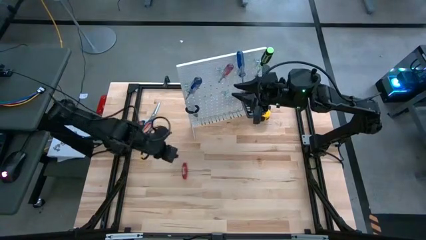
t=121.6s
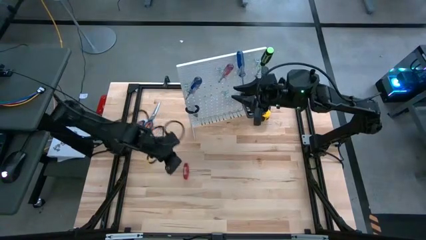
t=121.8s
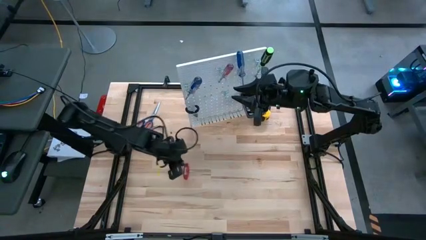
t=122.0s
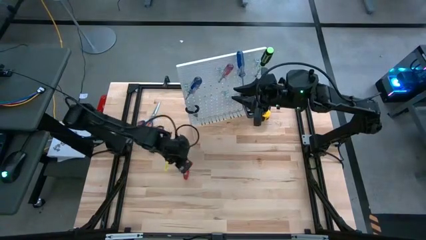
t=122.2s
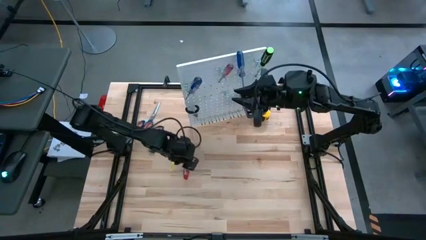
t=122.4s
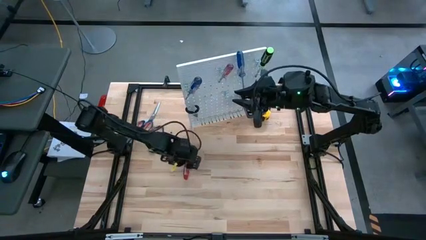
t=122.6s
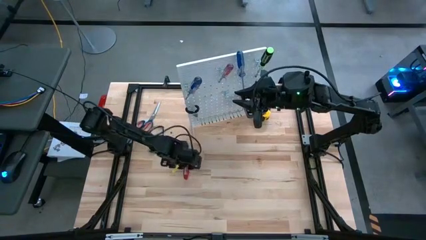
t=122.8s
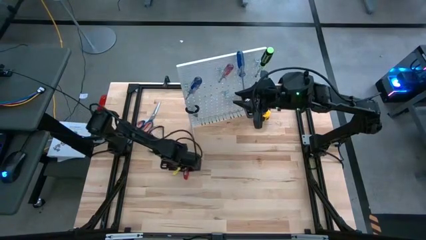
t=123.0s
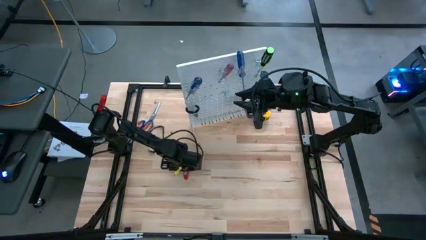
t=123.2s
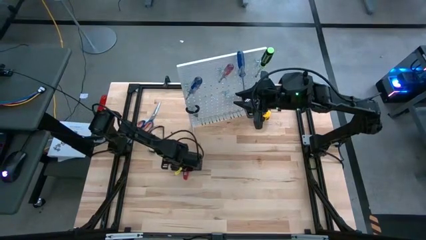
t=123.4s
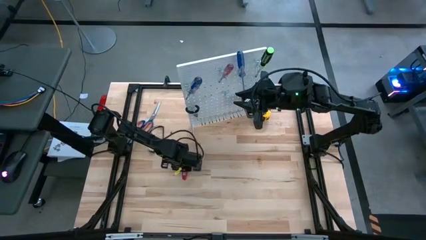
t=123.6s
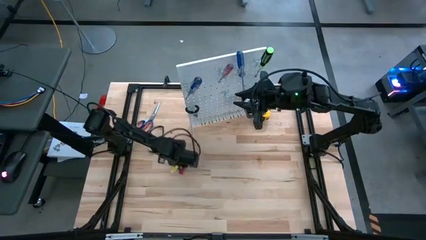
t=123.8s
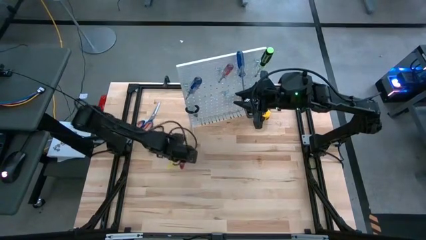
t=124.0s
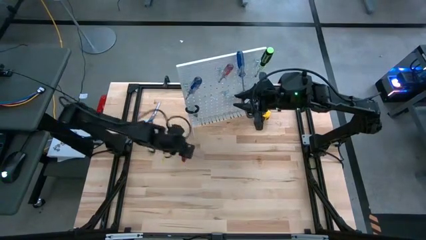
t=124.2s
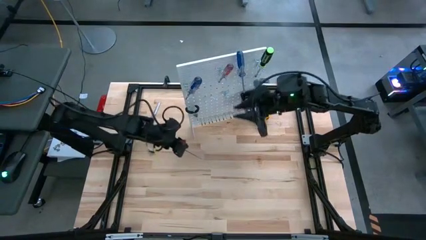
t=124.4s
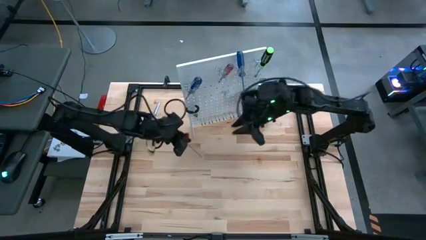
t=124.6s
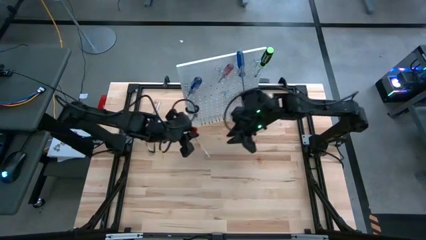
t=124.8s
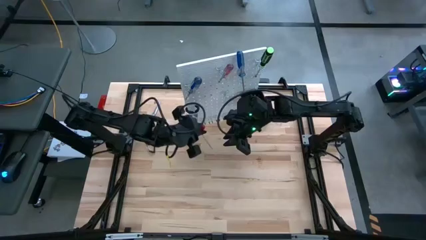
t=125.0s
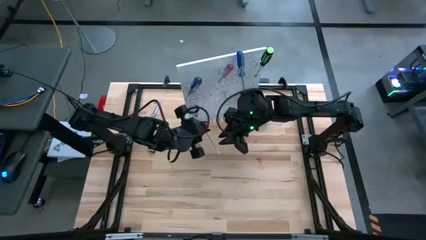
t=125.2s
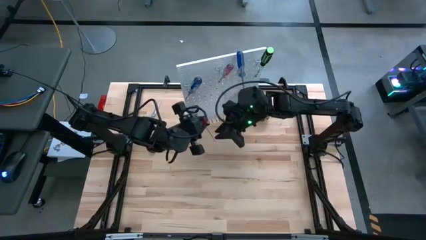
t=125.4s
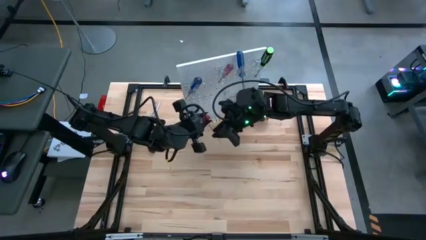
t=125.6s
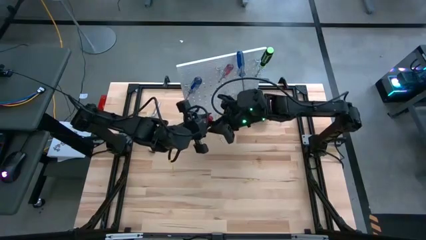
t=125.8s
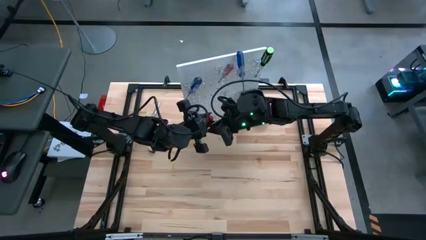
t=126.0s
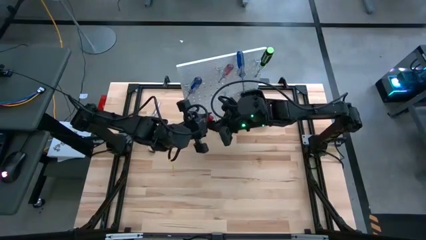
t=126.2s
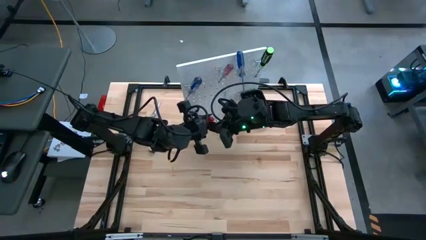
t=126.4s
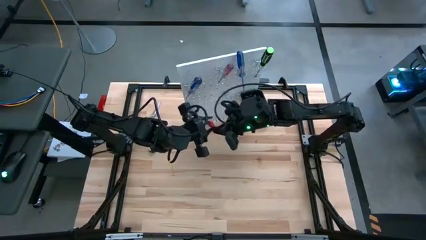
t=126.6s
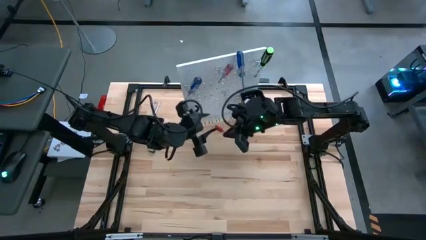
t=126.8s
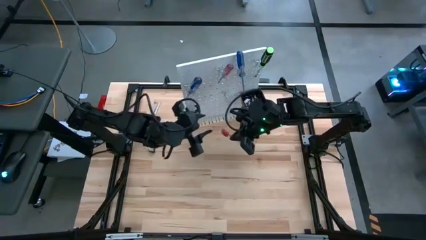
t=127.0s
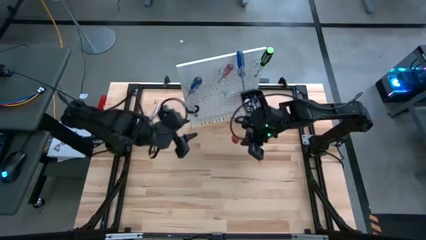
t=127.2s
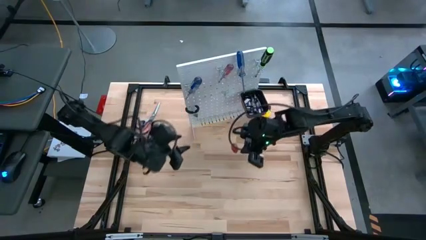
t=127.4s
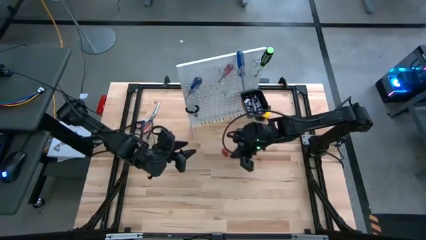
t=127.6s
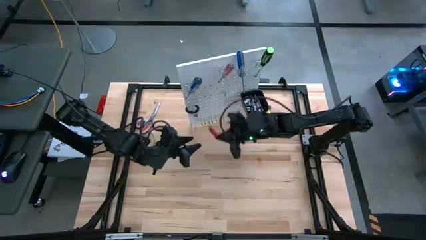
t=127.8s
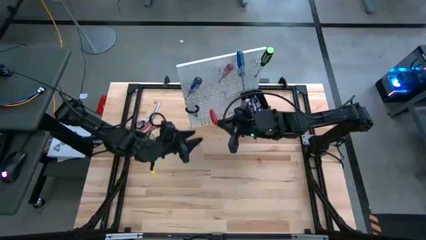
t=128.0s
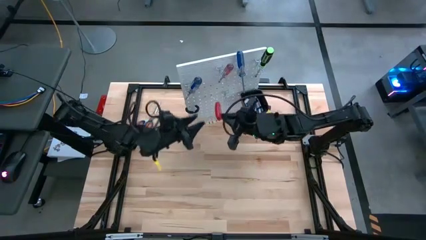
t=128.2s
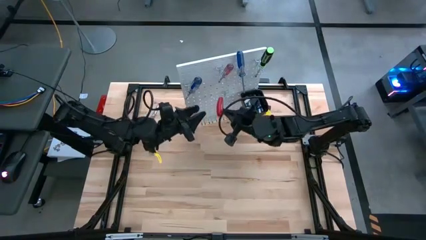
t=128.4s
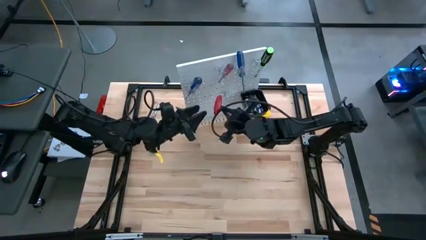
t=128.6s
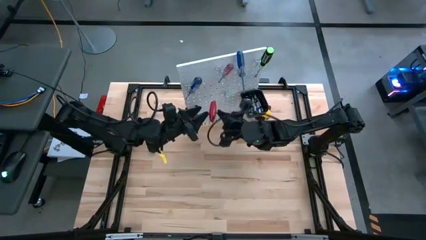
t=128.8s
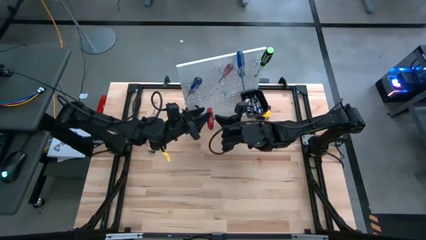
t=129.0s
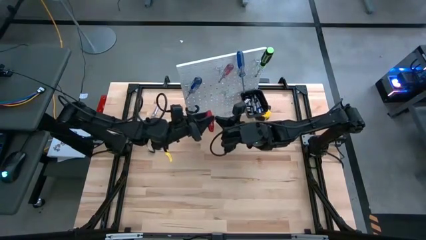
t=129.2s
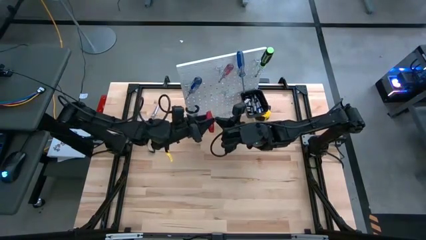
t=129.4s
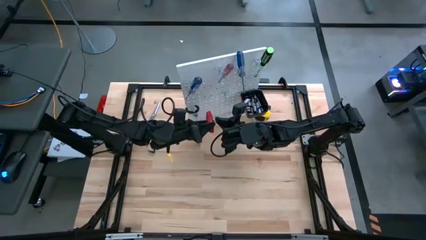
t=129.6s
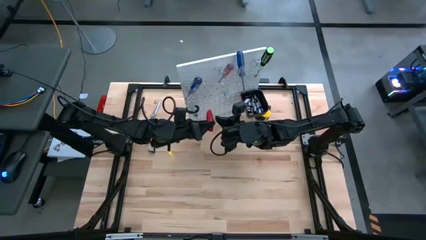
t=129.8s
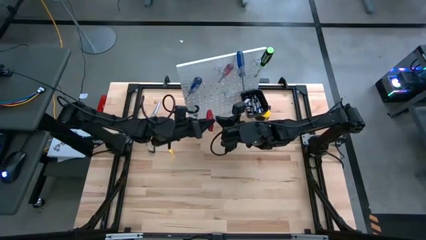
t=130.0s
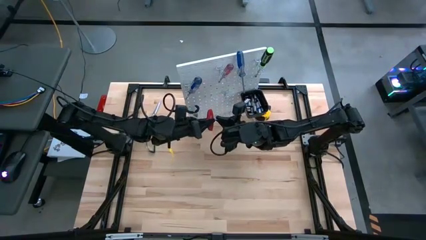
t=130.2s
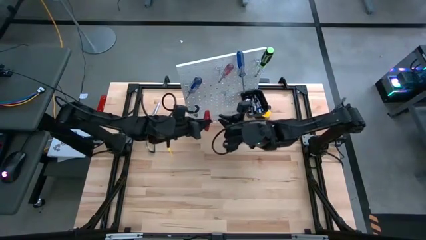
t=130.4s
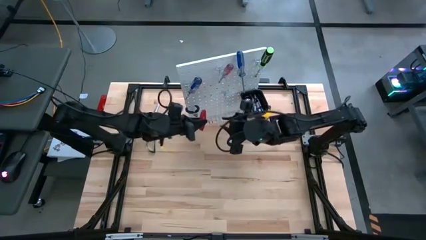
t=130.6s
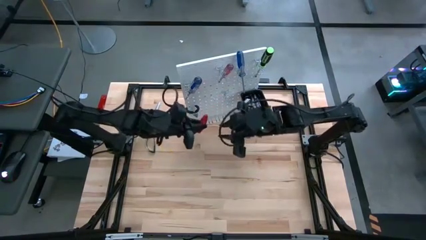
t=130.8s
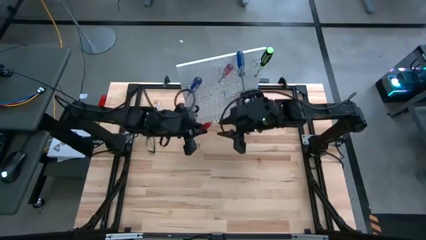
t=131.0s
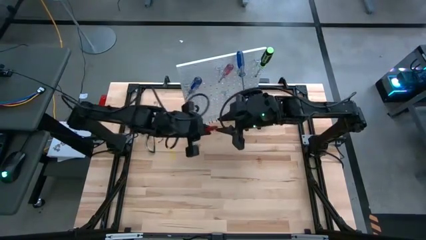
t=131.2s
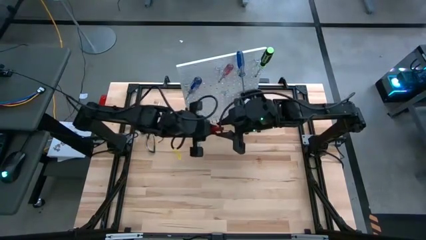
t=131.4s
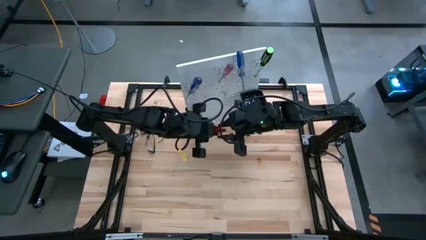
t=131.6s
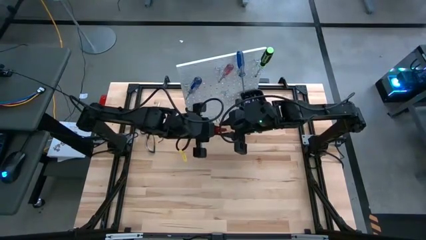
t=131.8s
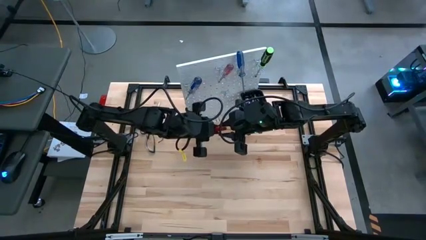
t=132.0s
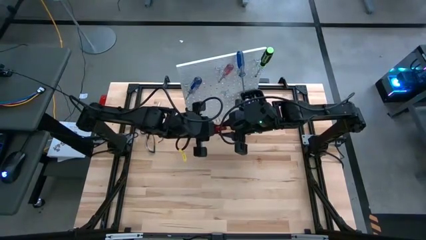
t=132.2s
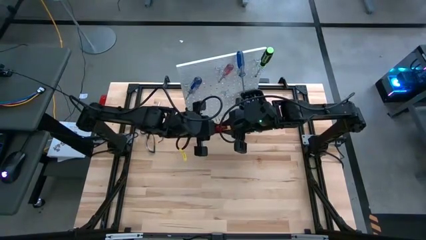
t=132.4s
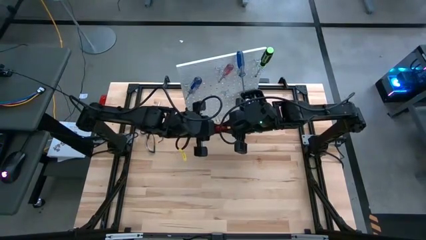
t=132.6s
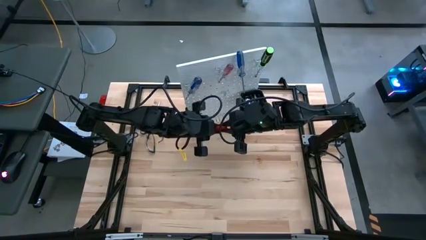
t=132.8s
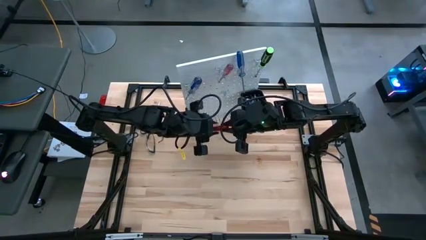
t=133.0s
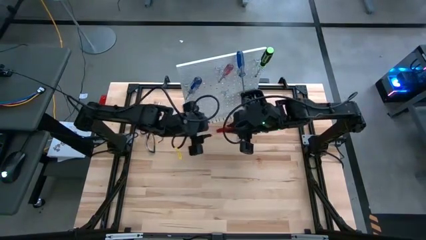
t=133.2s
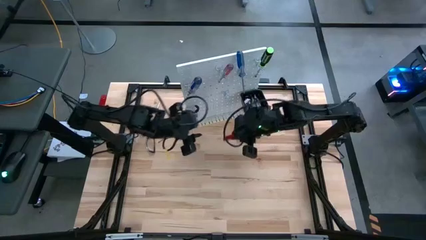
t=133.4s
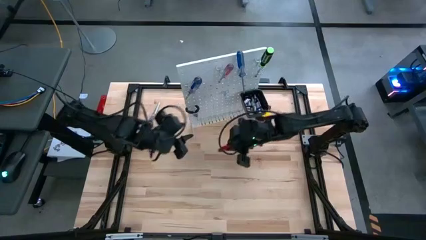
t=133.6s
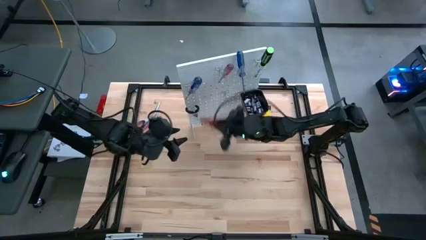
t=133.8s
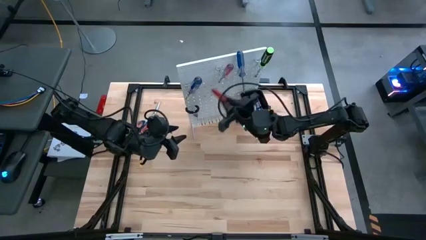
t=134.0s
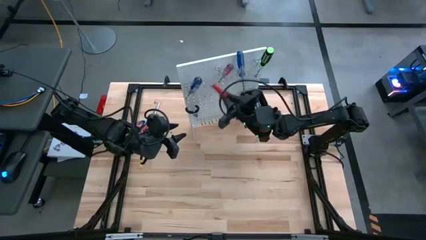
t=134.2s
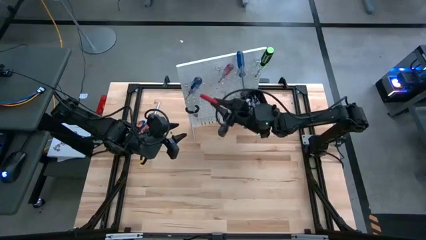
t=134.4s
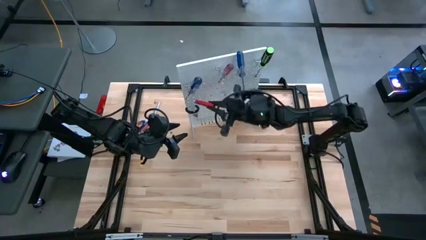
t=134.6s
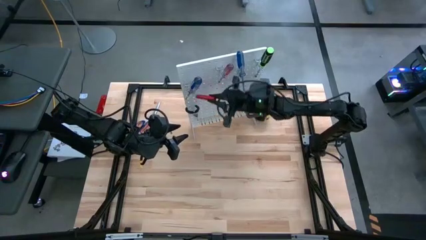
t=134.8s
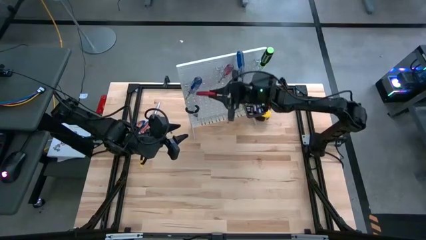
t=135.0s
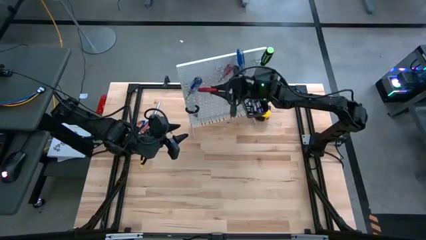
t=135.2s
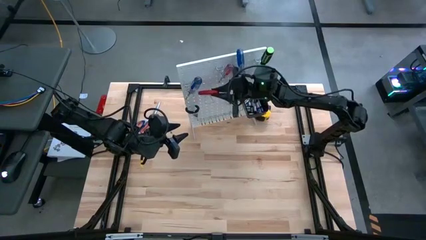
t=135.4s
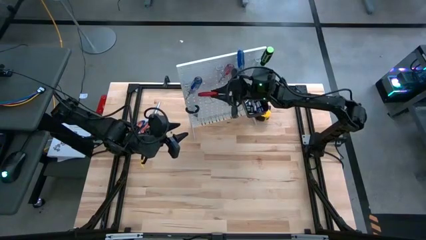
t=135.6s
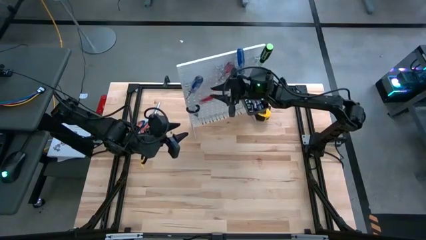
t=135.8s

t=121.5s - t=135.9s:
Task: Hang tools onto peg board
Hang the red allen wrench on the peg board

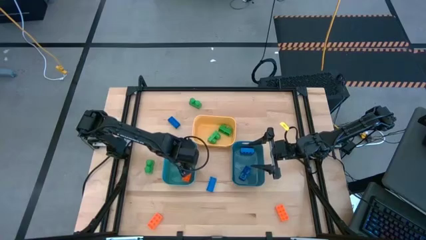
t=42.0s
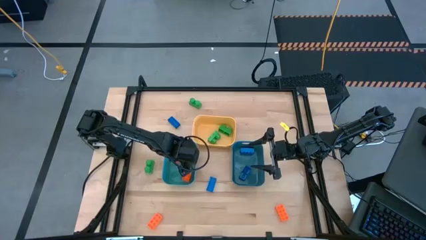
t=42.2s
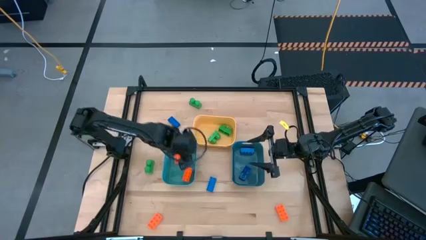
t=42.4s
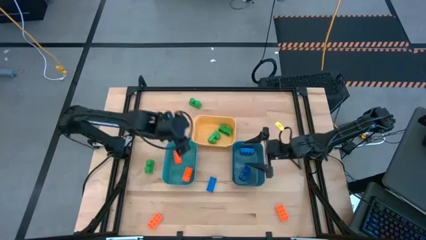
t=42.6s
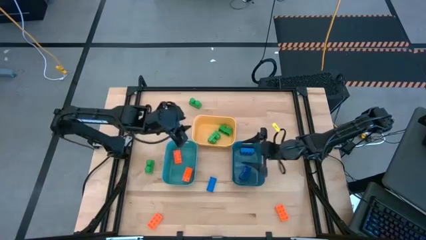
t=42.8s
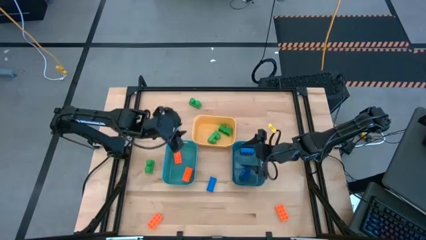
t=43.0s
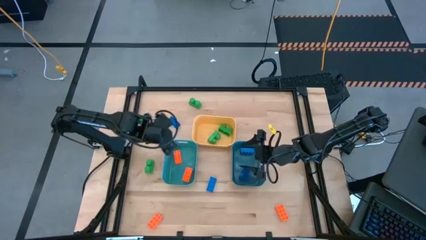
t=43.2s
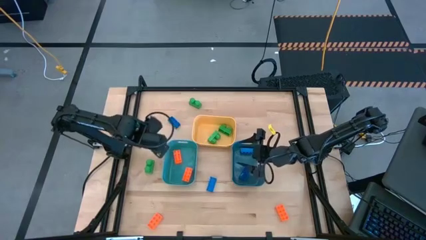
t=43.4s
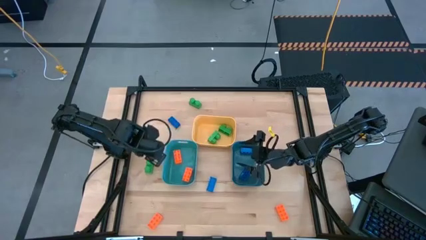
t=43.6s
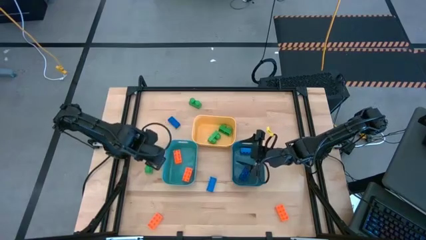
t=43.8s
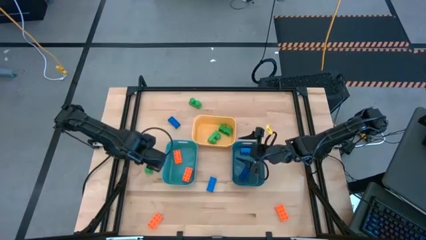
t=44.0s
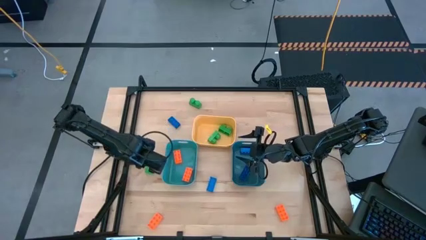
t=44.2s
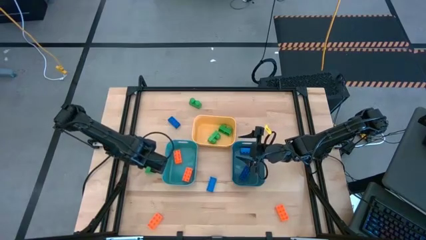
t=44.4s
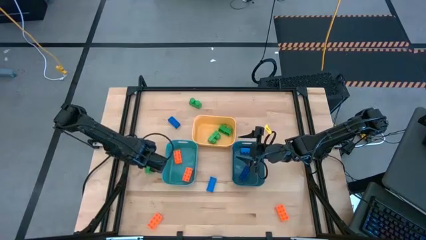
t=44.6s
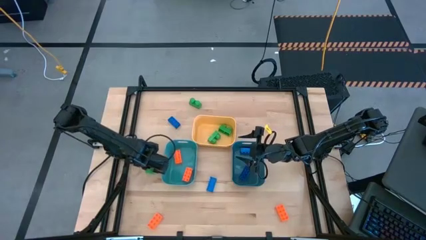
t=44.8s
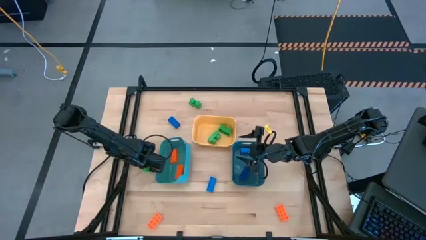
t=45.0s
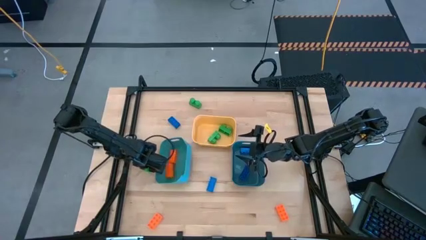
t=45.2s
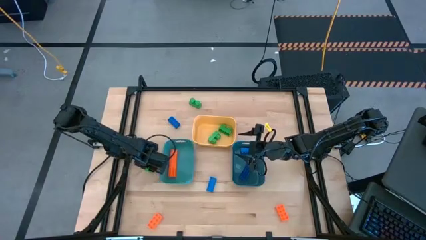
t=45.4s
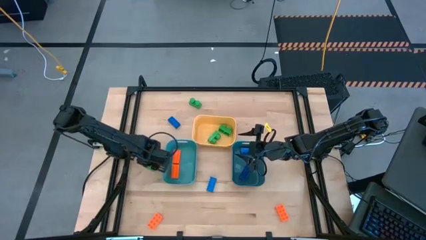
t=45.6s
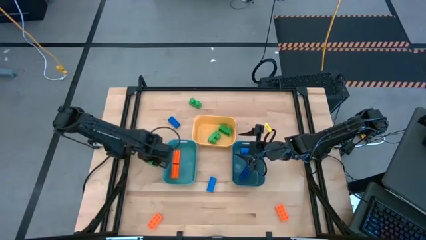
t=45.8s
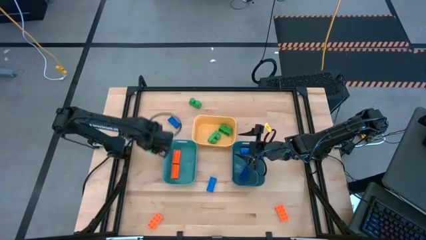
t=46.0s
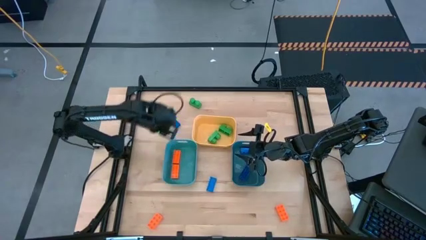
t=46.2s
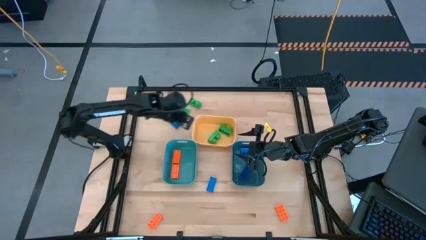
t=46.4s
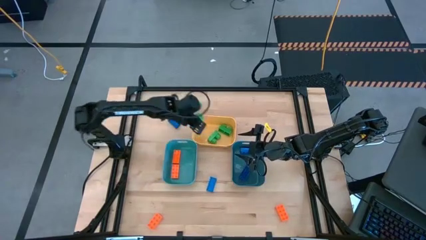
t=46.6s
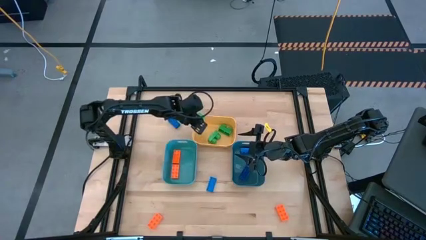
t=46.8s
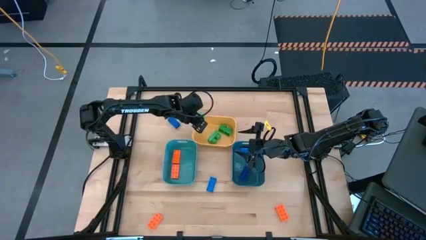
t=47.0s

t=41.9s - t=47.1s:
Task: Sort & place blocks by color
Put the green game piece into the yellow bin
